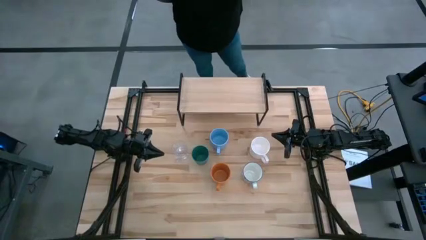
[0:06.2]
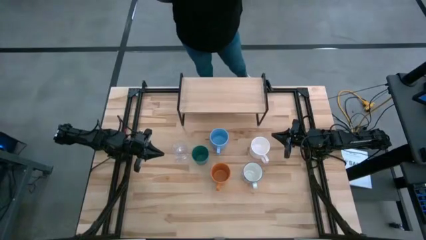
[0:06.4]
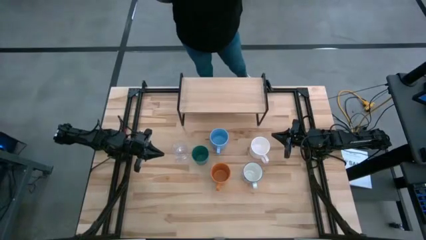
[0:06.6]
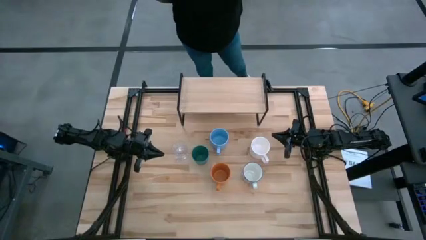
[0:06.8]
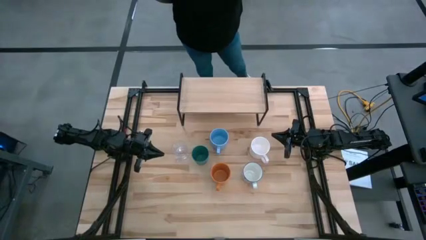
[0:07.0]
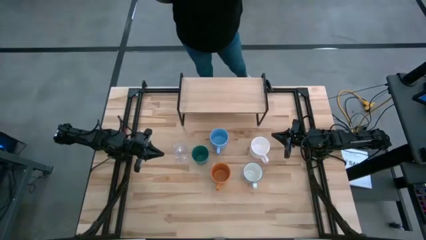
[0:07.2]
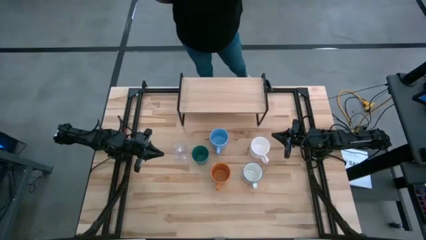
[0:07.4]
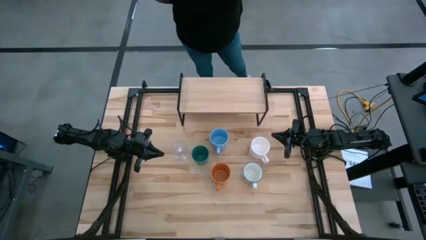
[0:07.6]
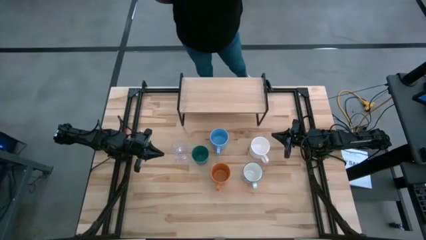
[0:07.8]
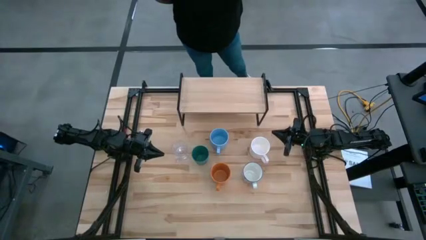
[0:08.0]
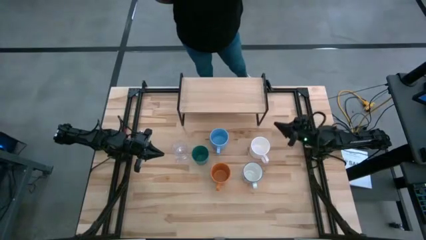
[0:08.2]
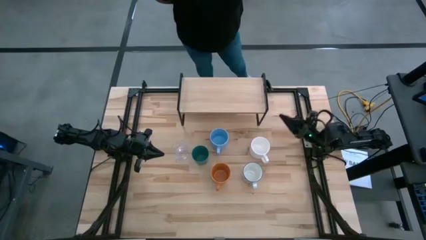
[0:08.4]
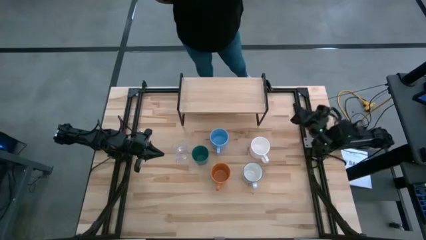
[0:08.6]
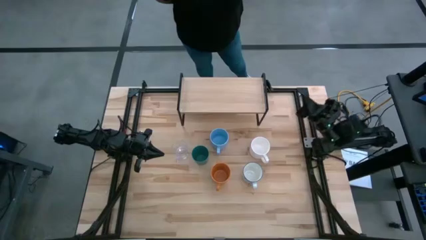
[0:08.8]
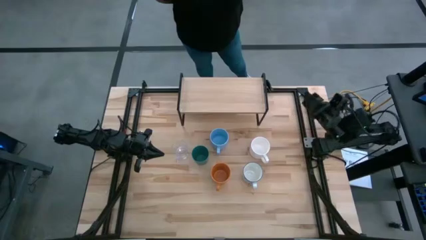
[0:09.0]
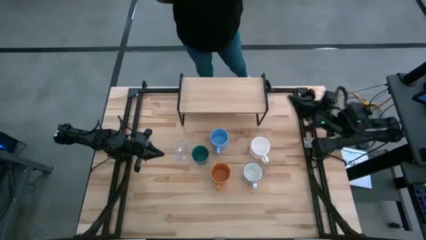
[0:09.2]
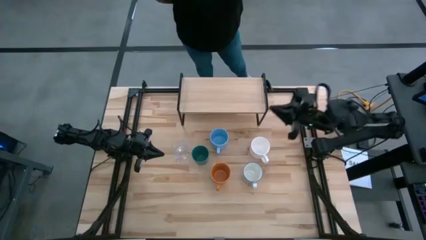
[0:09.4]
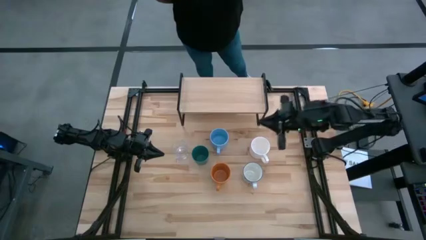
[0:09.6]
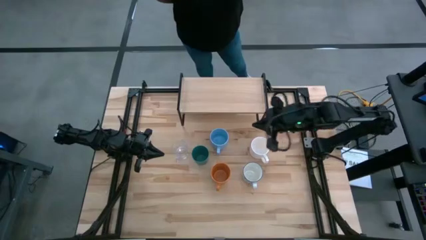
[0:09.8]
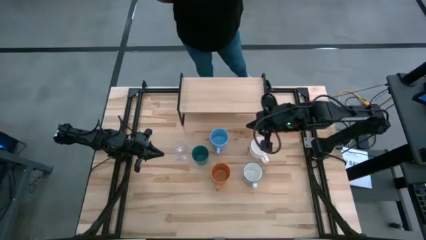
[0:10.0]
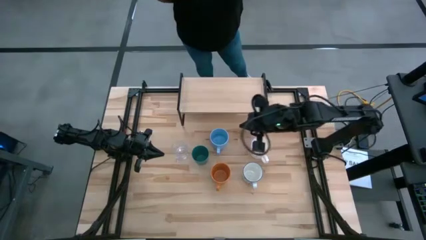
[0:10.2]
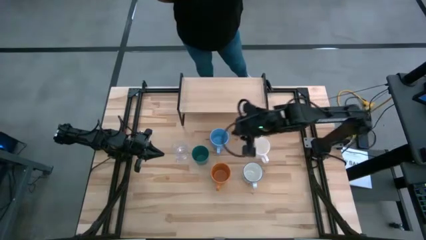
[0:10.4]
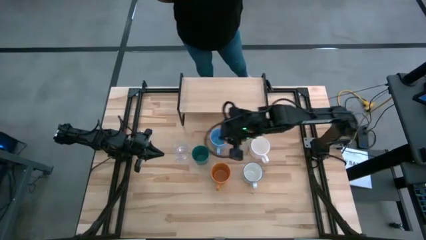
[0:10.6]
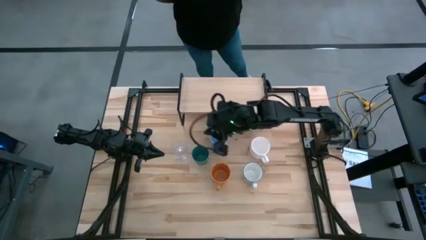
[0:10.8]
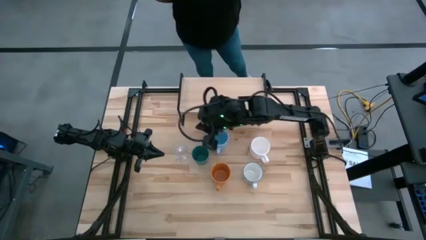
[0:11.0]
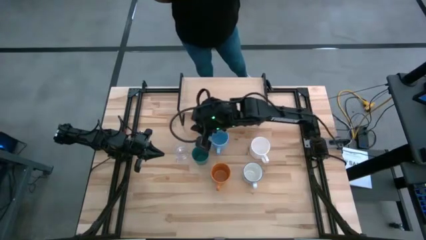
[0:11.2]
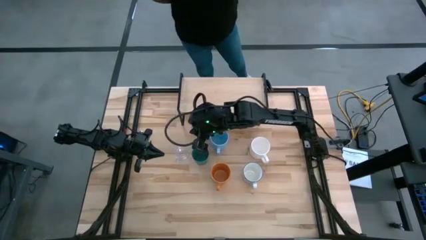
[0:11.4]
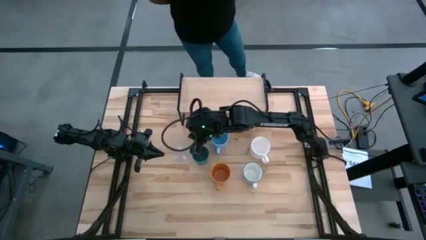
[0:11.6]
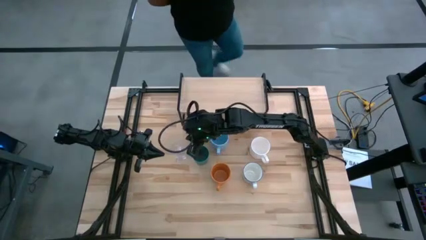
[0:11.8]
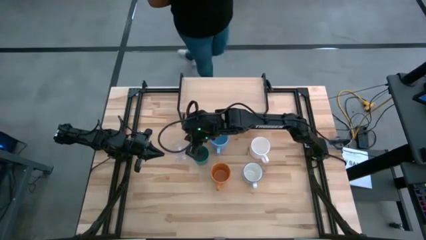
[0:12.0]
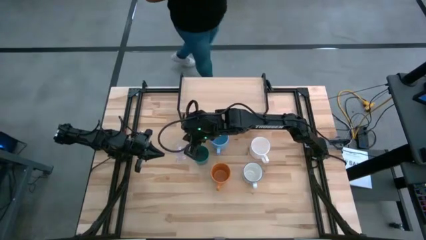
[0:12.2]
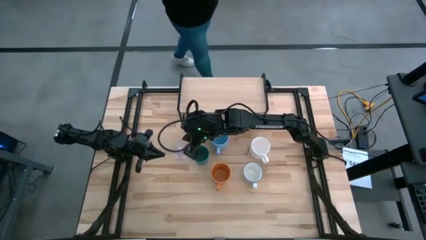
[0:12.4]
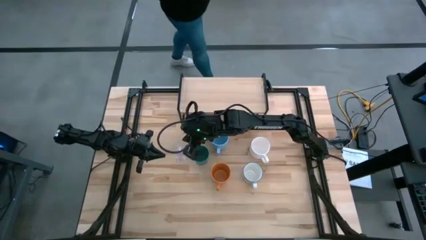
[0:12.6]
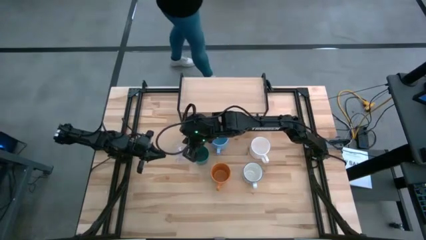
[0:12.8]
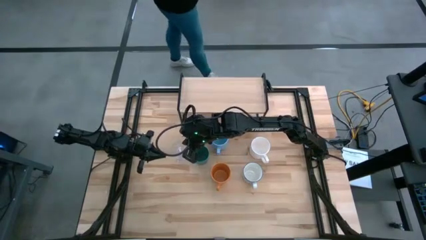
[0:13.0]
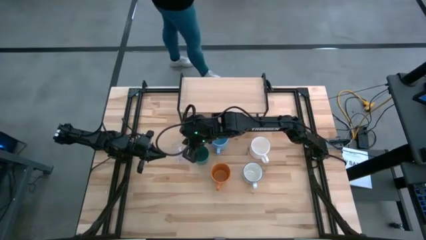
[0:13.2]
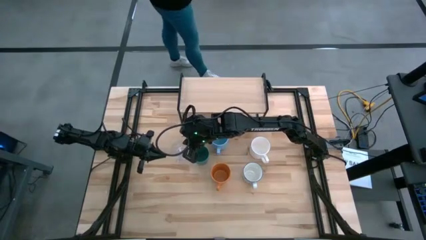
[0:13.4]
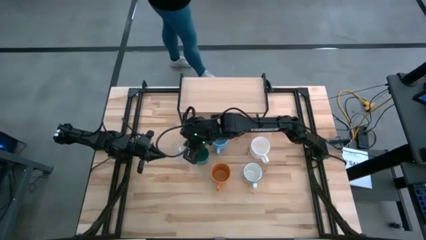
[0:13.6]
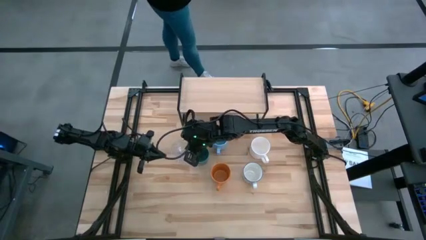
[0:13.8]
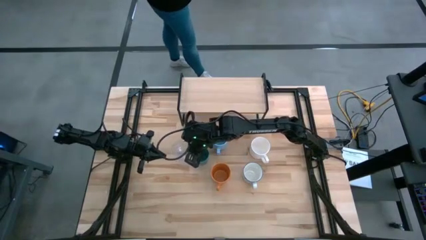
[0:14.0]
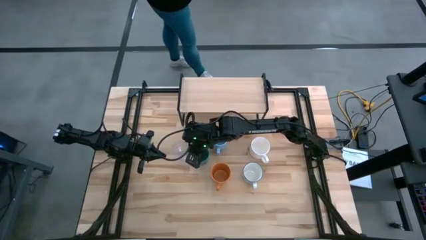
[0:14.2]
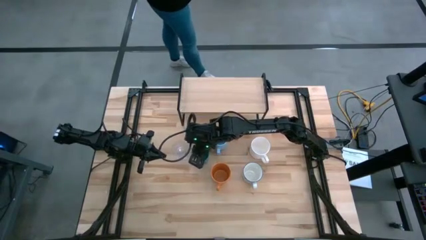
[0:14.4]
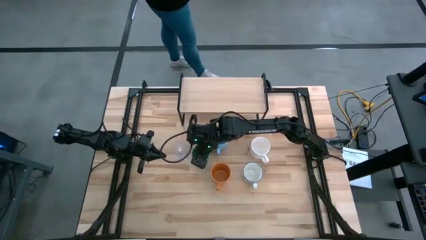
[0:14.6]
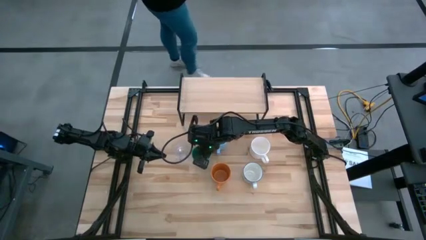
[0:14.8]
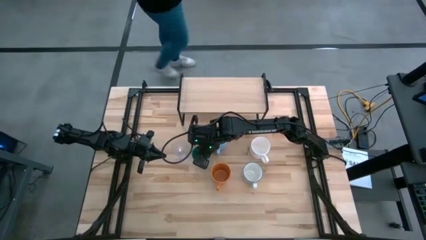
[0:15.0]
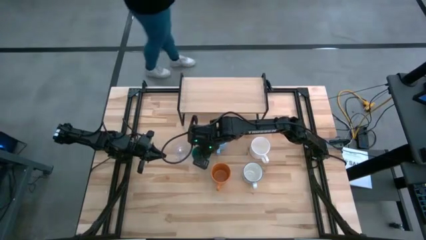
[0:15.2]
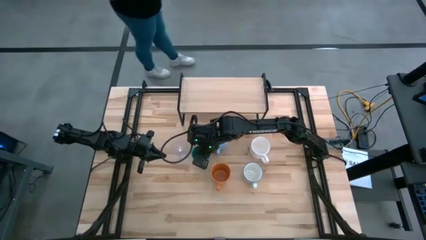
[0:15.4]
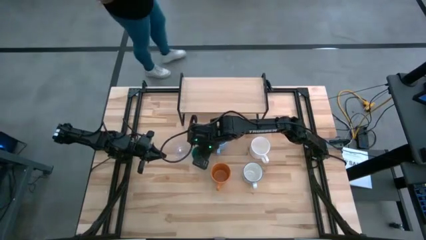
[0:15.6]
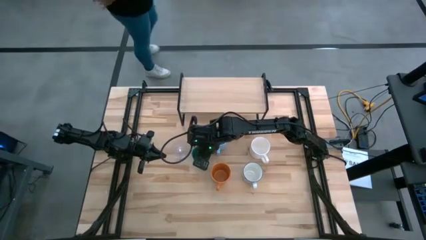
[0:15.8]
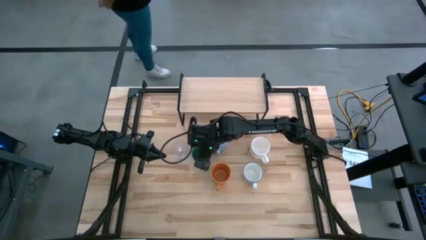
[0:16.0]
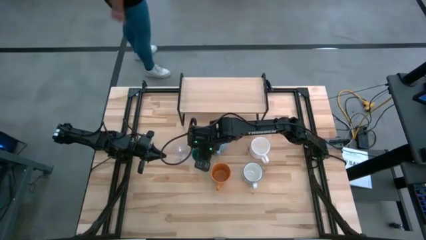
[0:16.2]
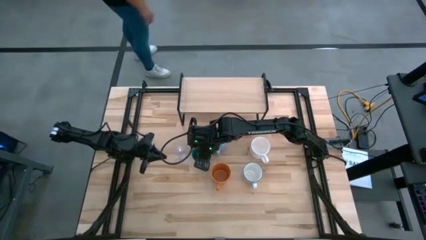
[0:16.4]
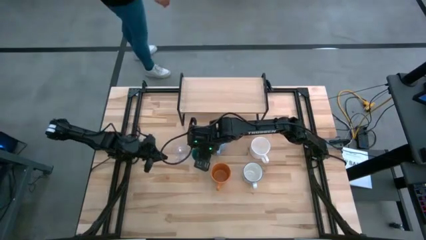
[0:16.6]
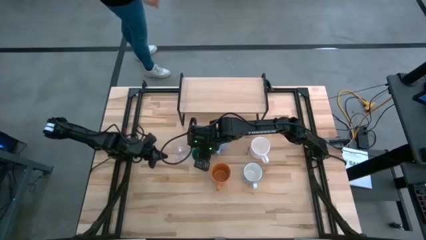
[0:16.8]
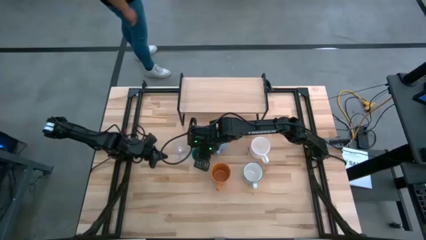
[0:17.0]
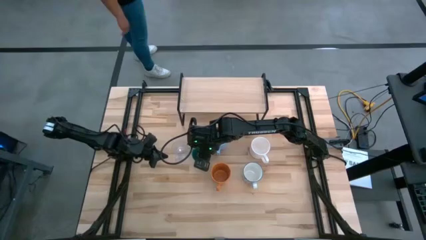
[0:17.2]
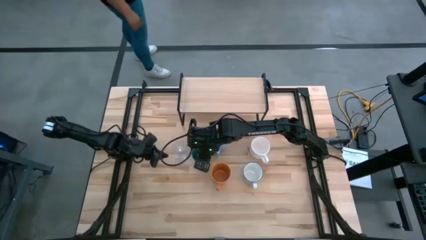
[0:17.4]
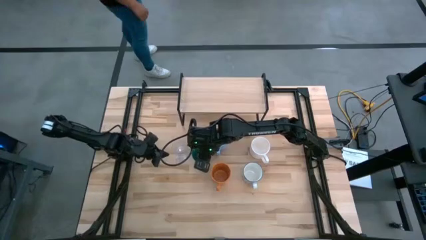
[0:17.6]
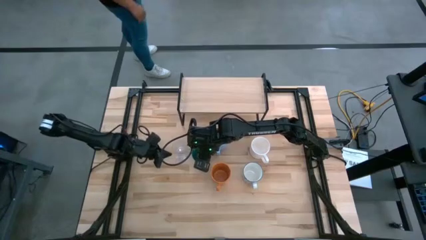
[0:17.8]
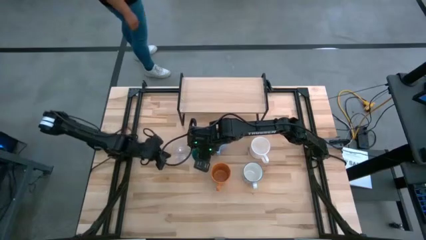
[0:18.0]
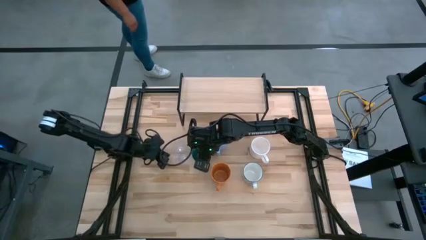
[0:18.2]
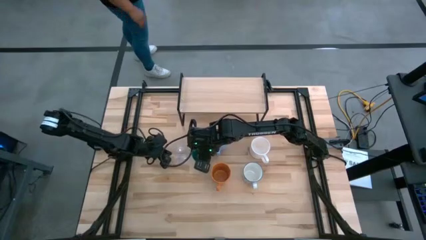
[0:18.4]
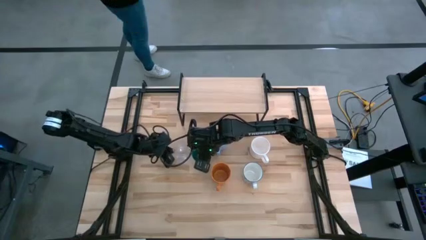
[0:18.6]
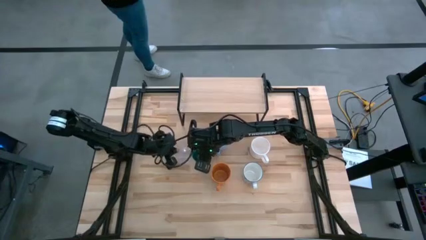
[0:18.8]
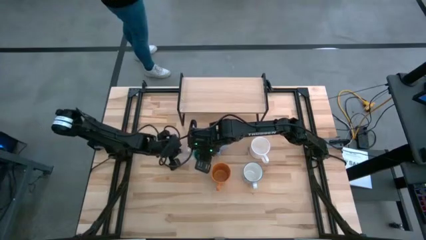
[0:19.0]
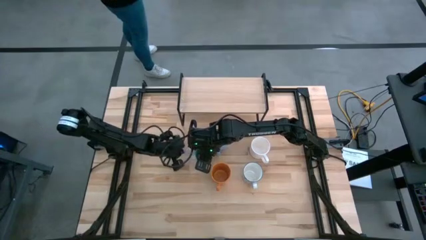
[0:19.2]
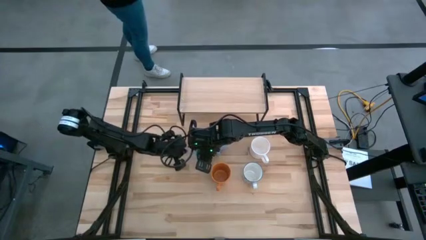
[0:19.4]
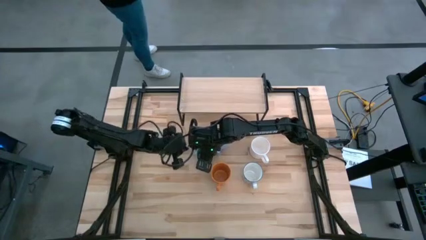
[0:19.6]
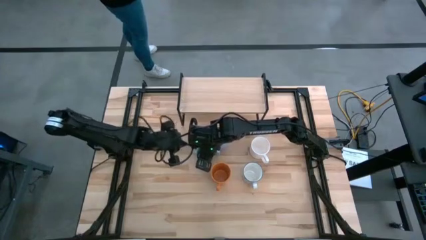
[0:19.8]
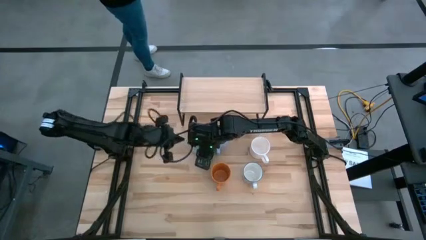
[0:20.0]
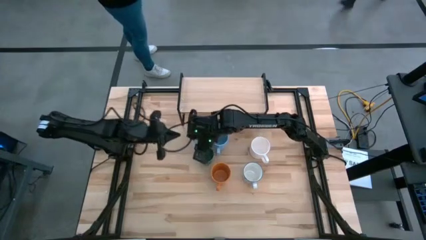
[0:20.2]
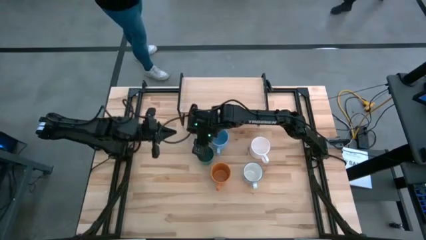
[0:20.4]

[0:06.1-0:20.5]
Task: Stack small to large cups/mugs on shelf
Put the transparent mug on the shelf

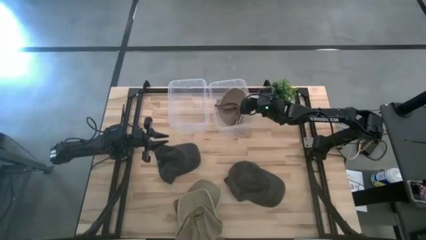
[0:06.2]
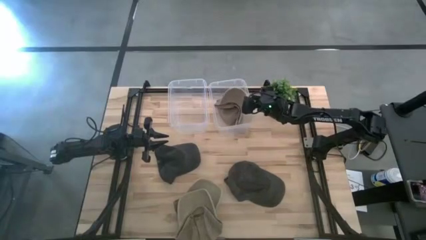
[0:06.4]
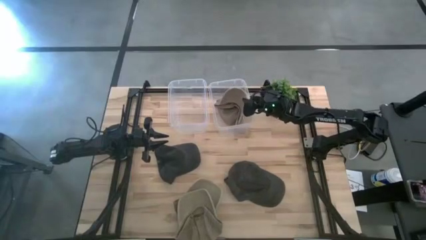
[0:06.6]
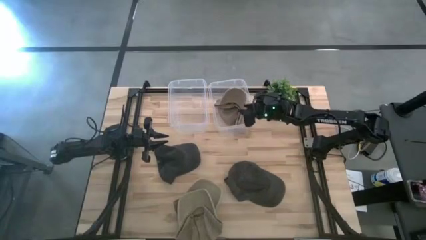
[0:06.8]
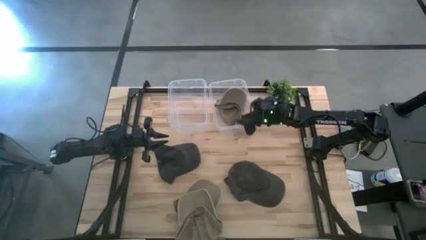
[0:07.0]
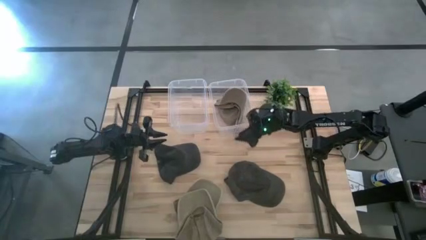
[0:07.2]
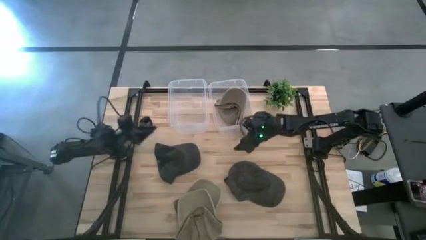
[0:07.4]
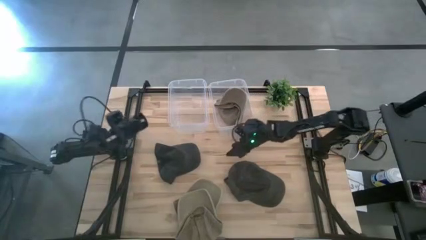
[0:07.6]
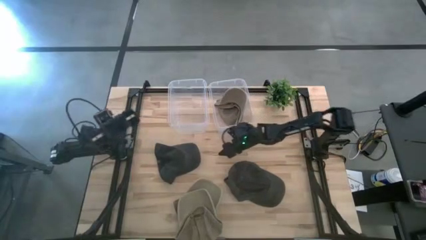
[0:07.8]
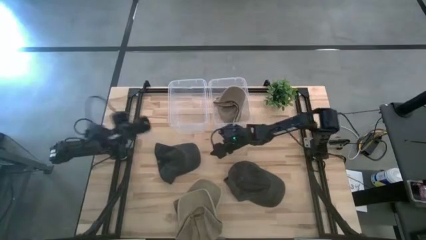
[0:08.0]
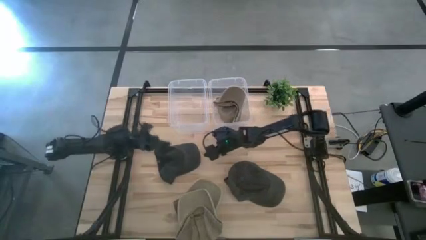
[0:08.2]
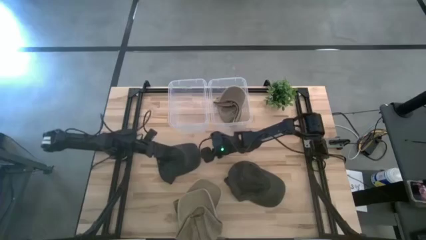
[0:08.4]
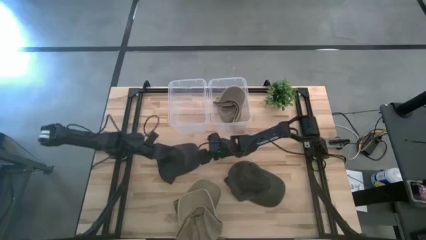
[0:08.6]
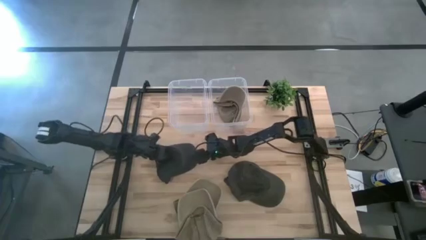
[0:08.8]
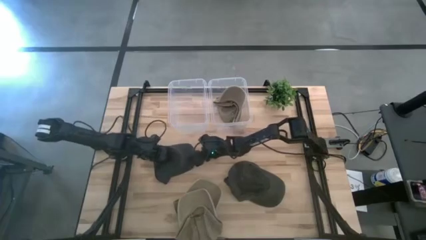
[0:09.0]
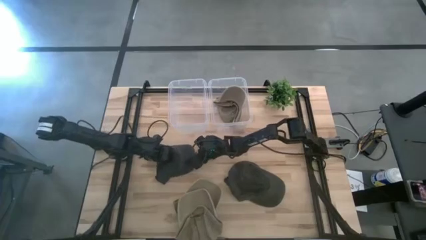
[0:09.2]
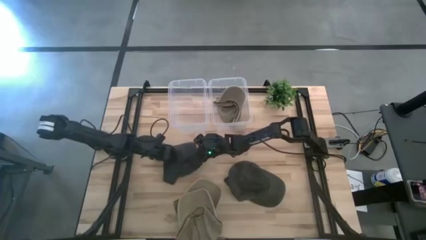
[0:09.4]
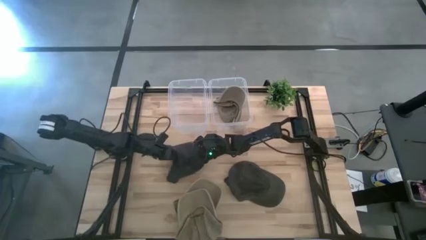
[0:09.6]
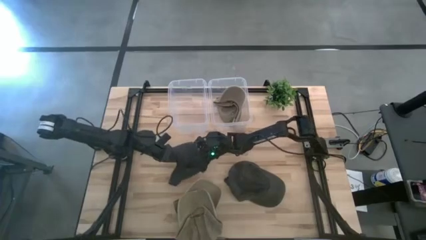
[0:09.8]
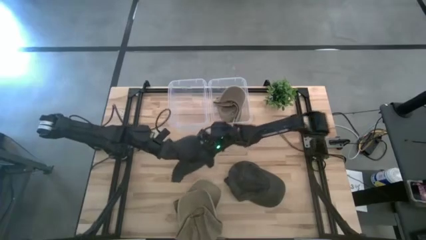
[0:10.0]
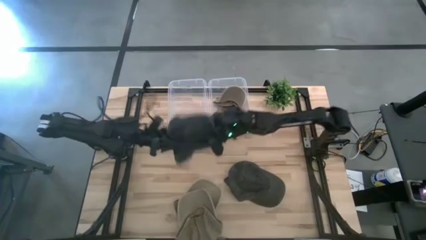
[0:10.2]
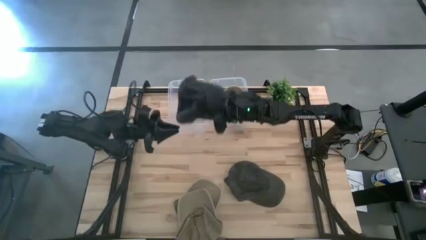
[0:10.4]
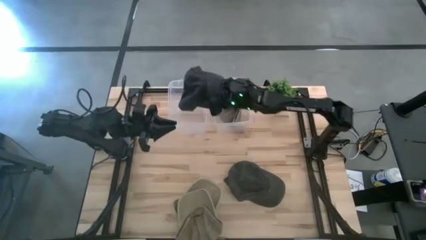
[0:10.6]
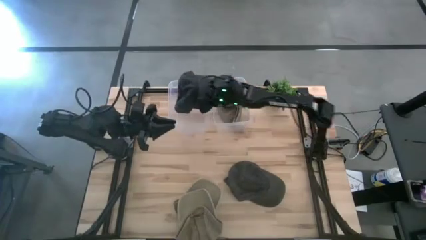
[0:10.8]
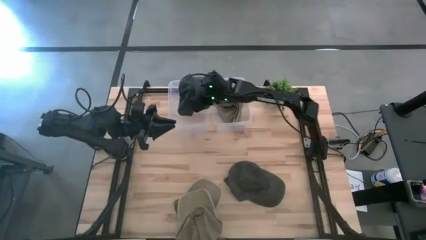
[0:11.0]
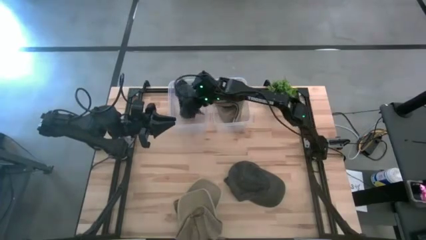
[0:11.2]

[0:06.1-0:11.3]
Task: Pick & Place hat
Put the left black cap into the left transparent container
